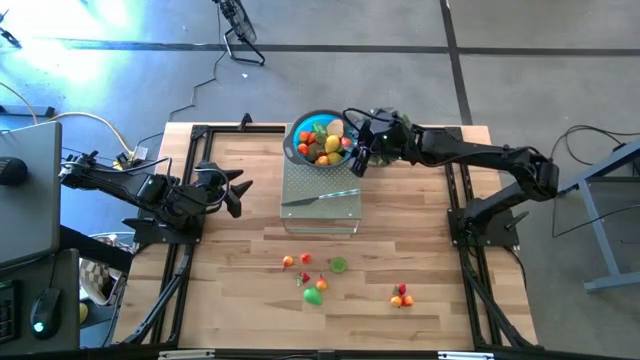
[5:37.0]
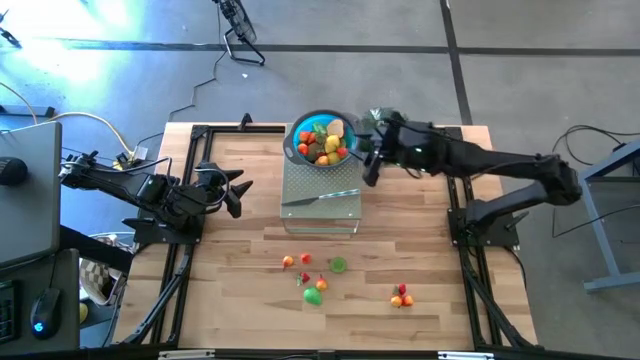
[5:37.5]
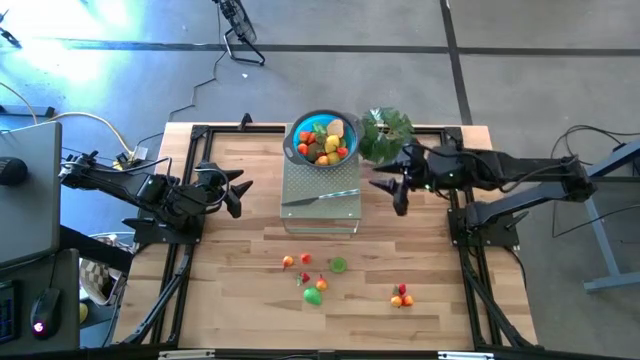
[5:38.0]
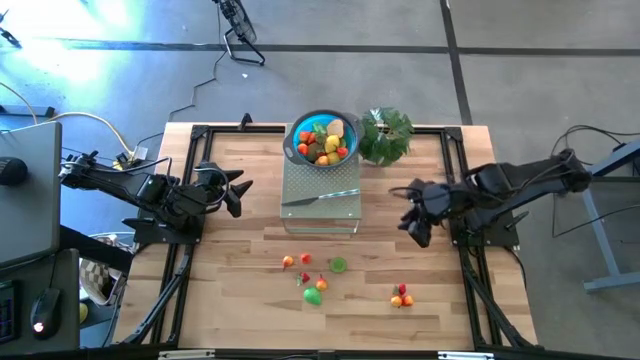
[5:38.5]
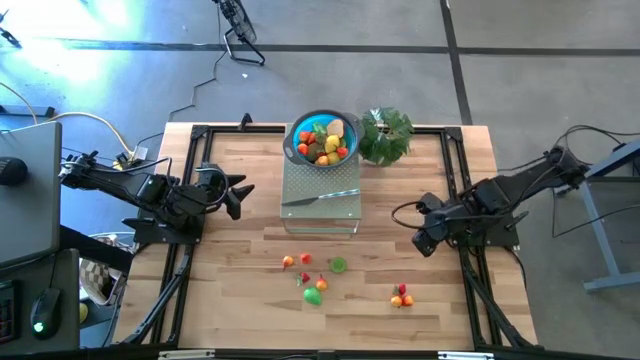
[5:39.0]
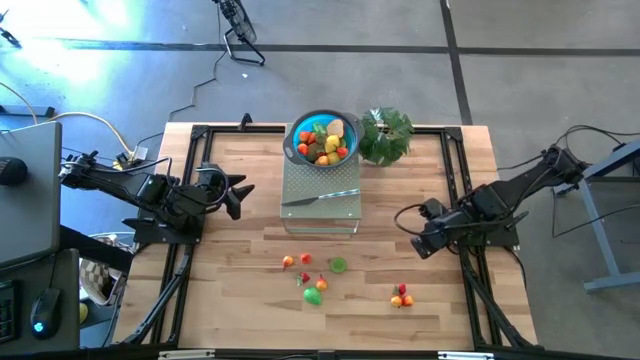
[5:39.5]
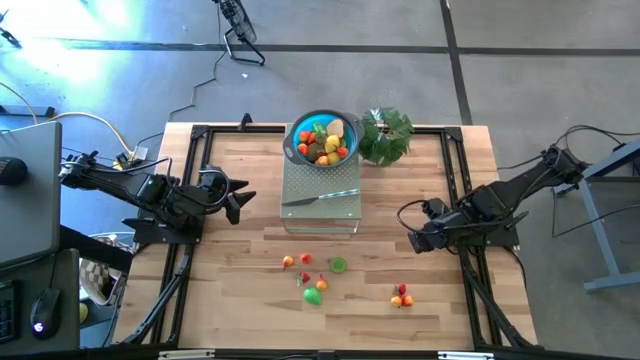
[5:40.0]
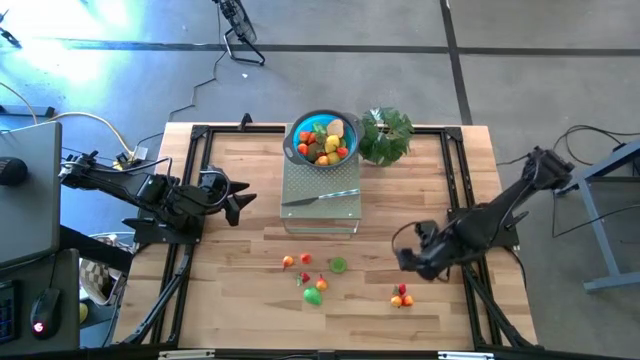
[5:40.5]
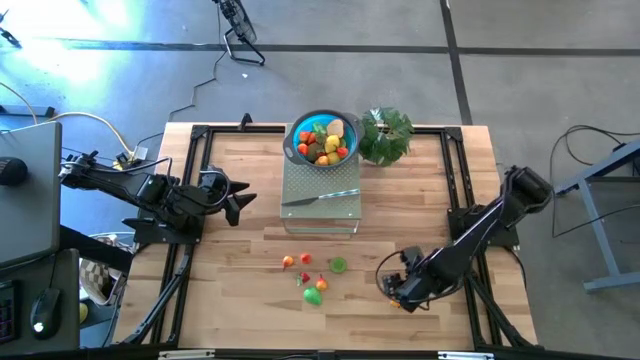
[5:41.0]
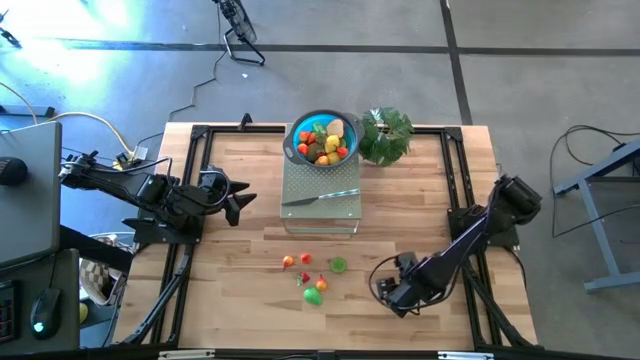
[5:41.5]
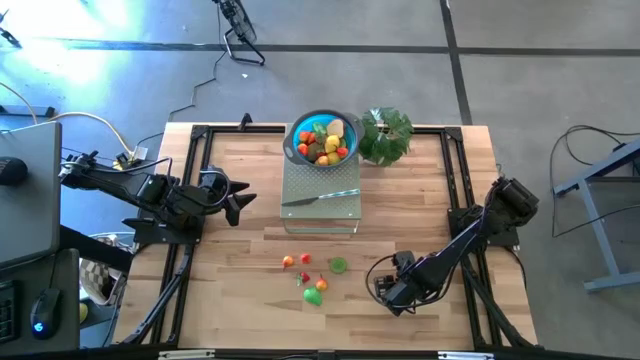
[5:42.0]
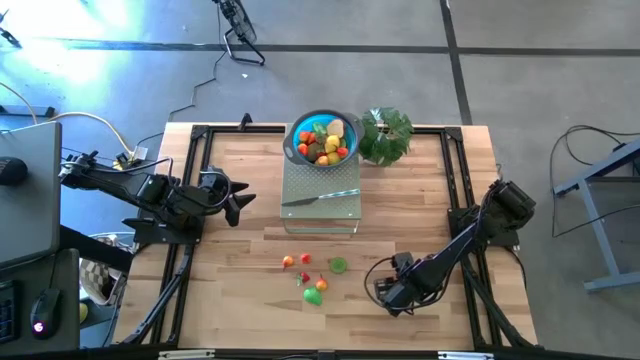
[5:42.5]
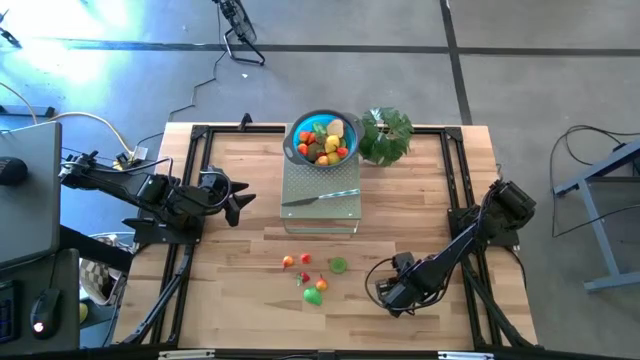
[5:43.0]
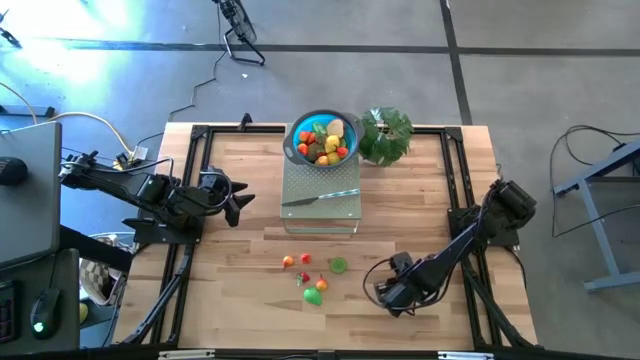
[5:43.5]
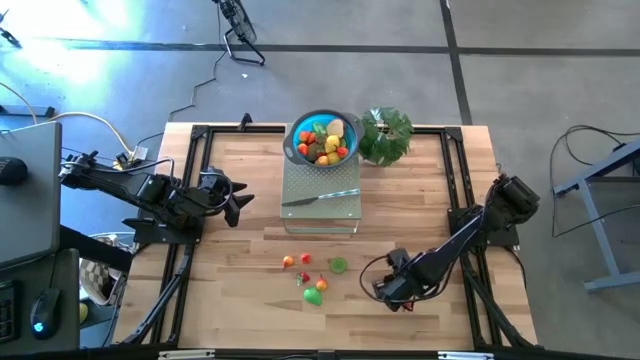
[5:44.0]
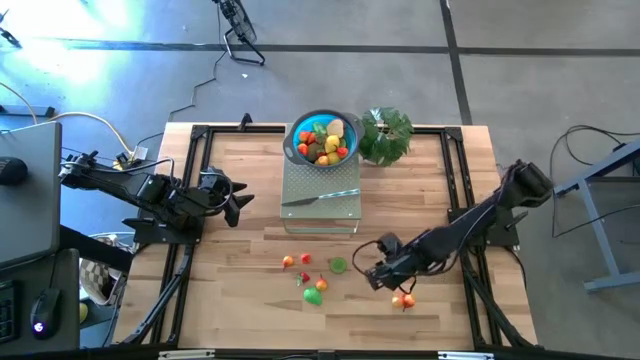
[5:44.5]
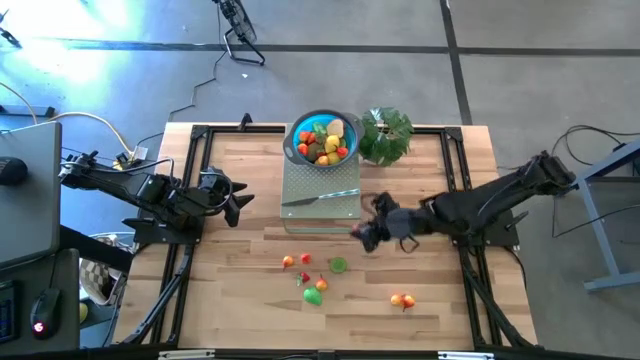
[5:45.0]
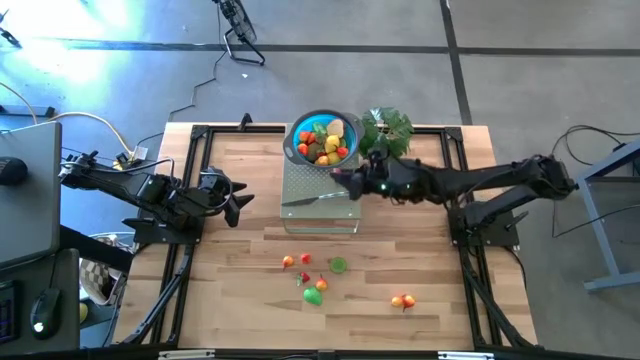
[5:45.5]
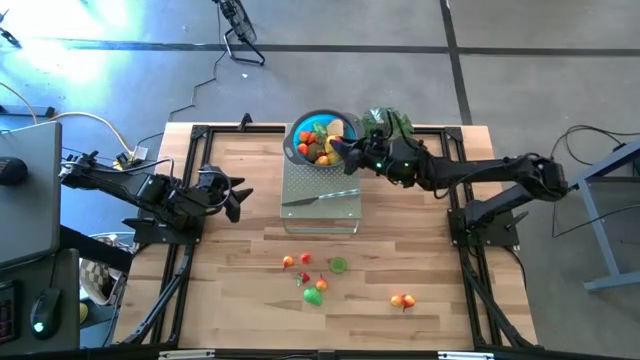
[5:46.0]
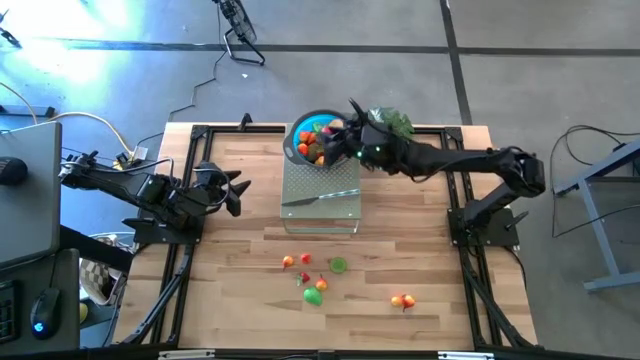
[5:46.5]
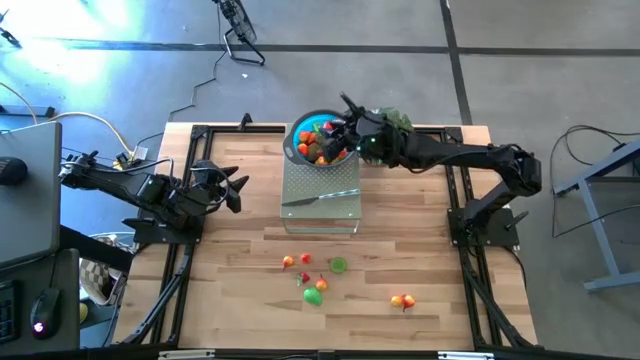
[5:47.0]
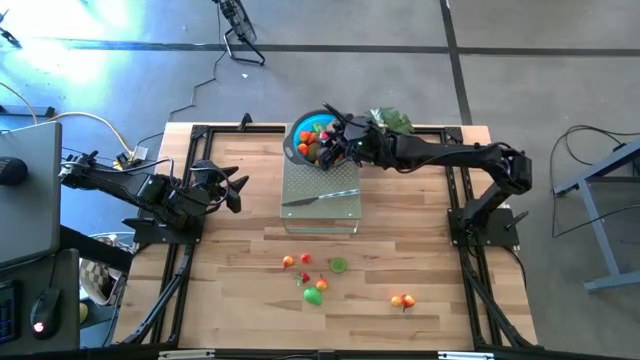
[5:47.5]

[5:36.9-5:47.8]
Task: Pick & Place Fruit
Put the red strawberry in the blue bowl on the shelf

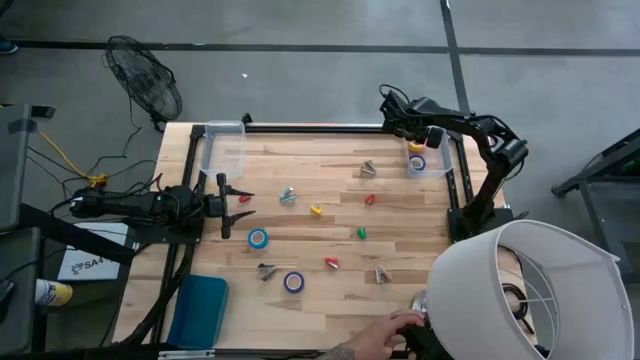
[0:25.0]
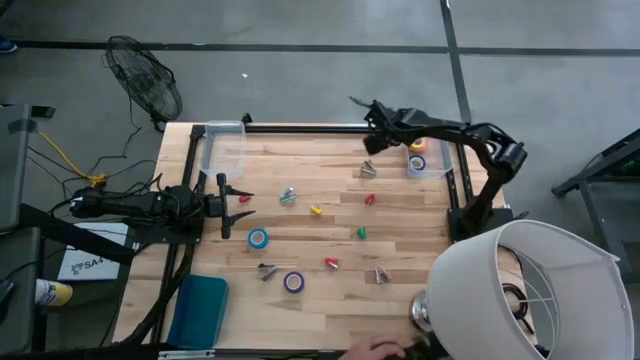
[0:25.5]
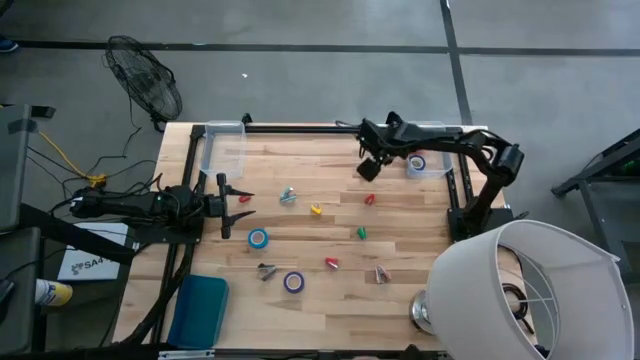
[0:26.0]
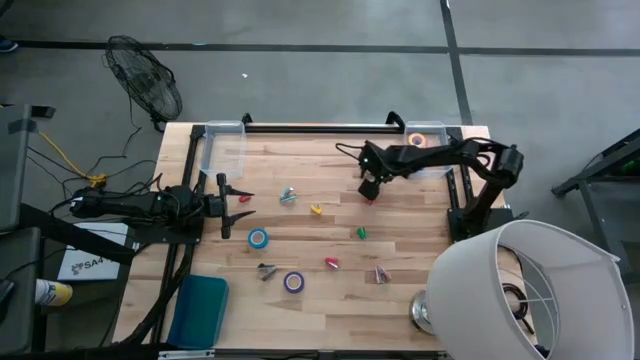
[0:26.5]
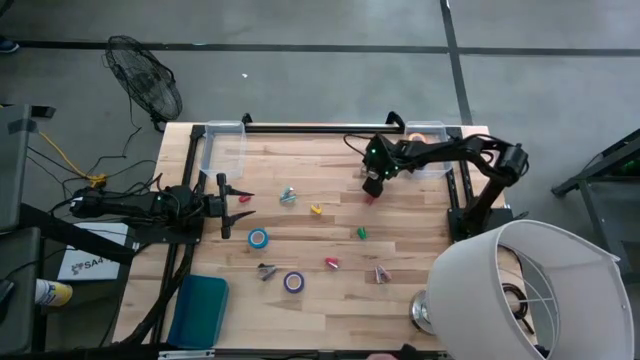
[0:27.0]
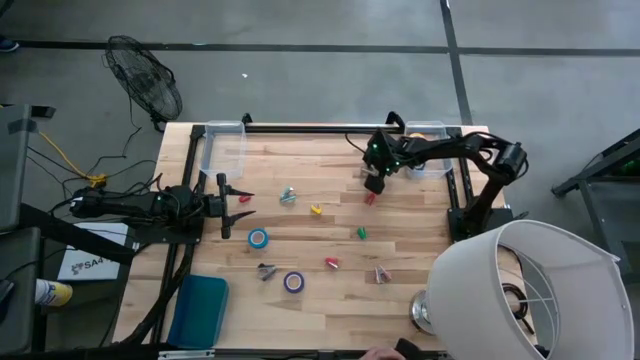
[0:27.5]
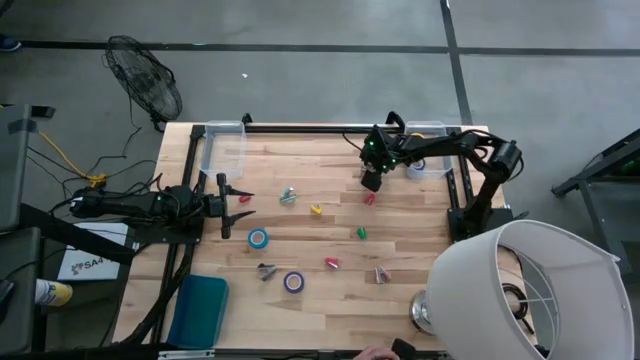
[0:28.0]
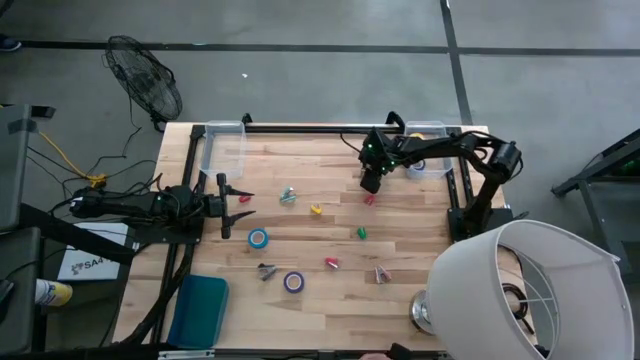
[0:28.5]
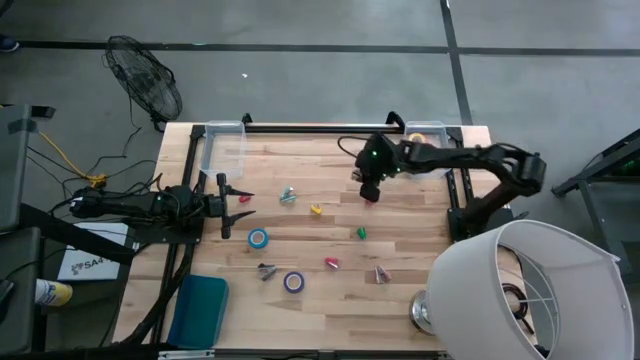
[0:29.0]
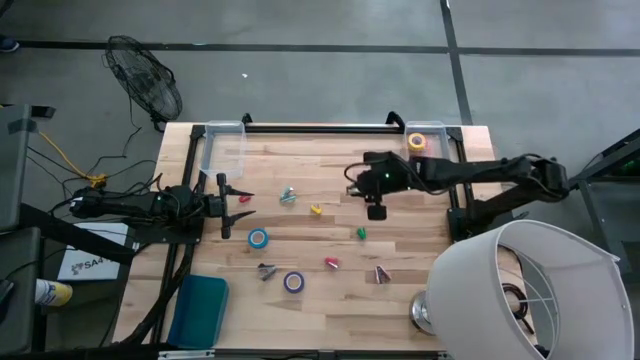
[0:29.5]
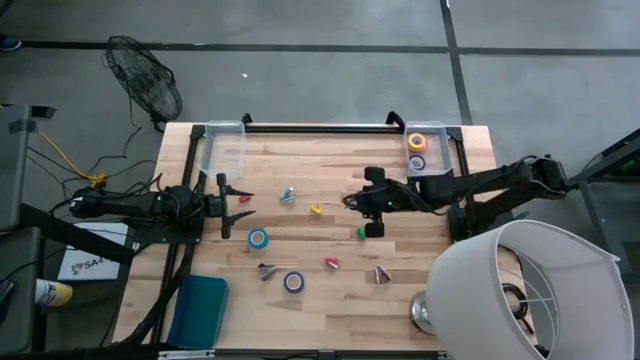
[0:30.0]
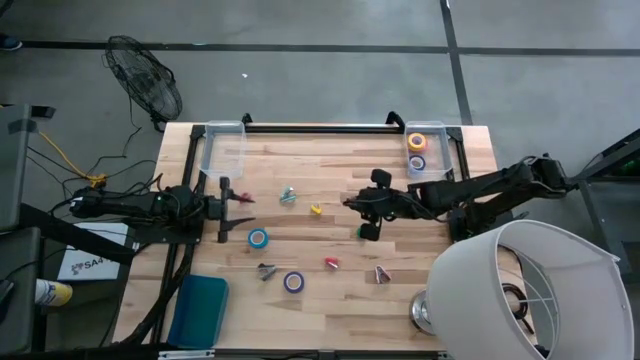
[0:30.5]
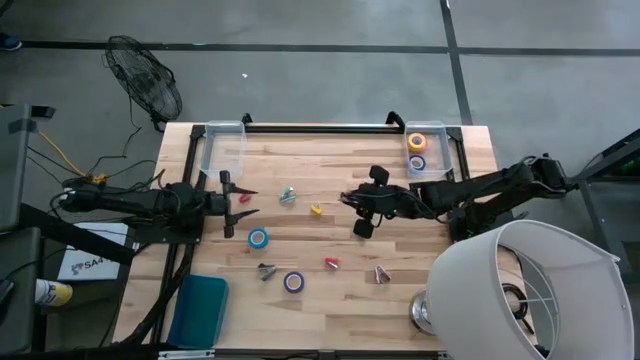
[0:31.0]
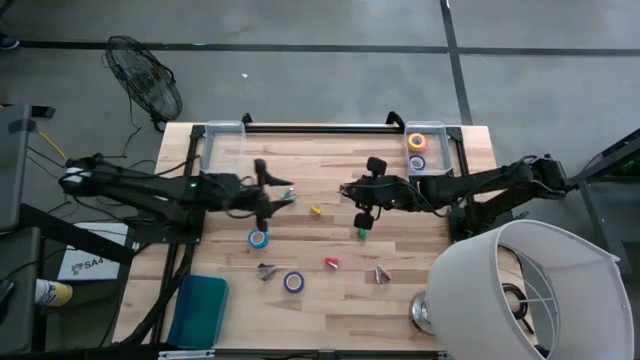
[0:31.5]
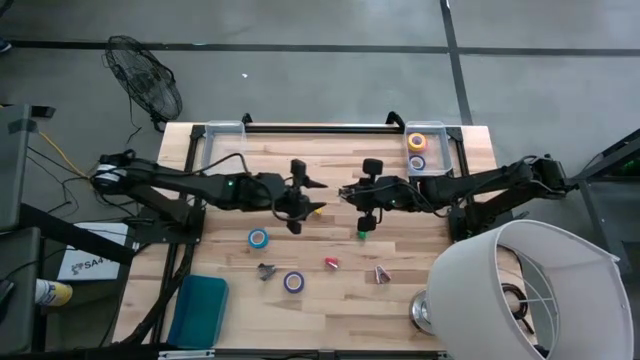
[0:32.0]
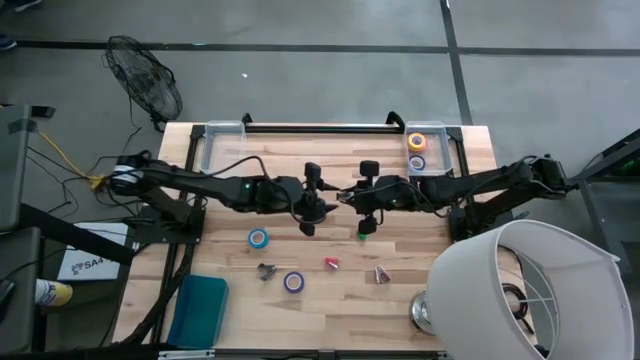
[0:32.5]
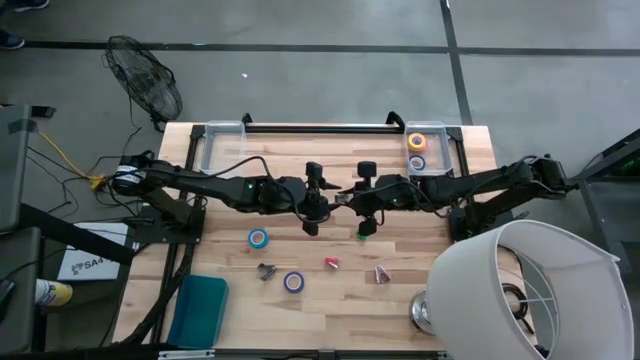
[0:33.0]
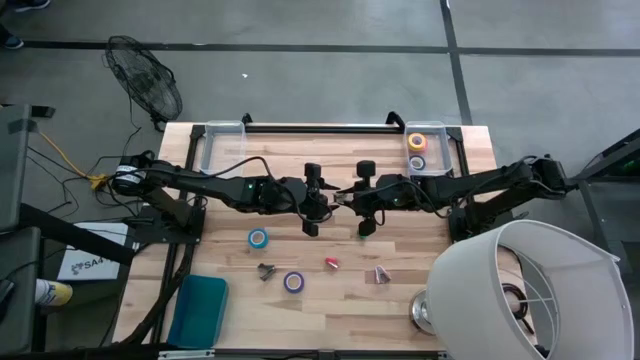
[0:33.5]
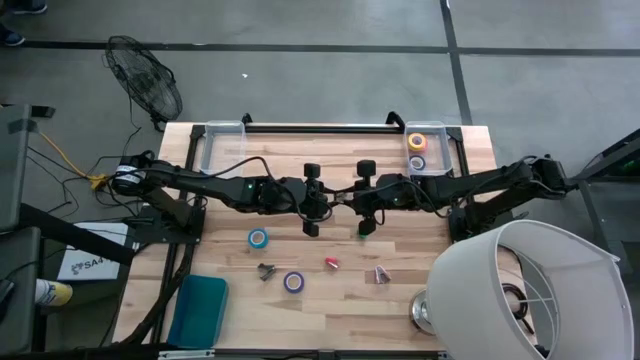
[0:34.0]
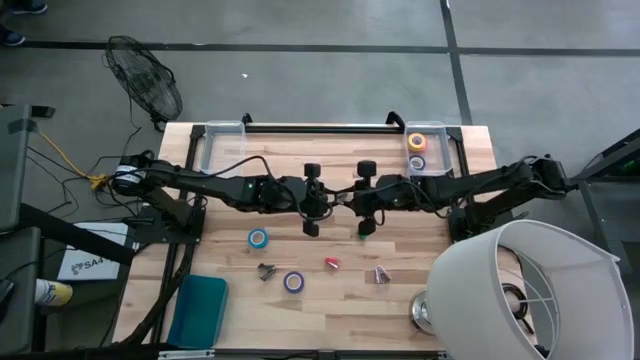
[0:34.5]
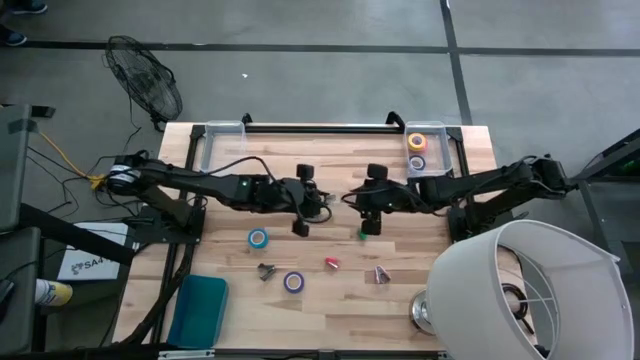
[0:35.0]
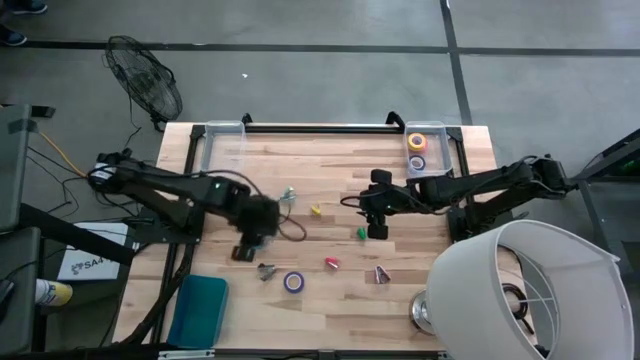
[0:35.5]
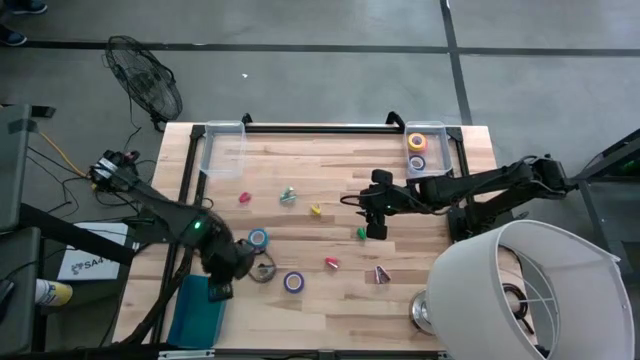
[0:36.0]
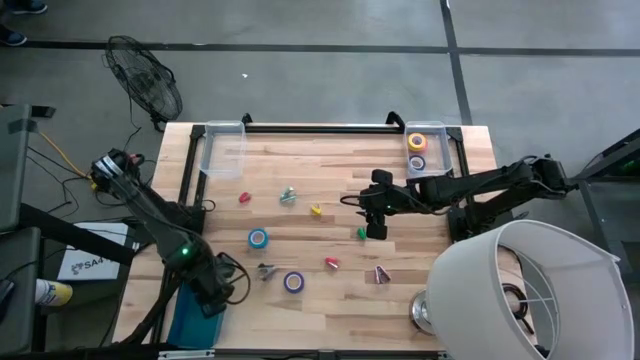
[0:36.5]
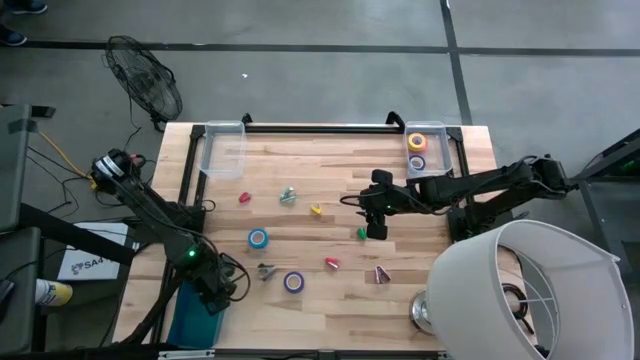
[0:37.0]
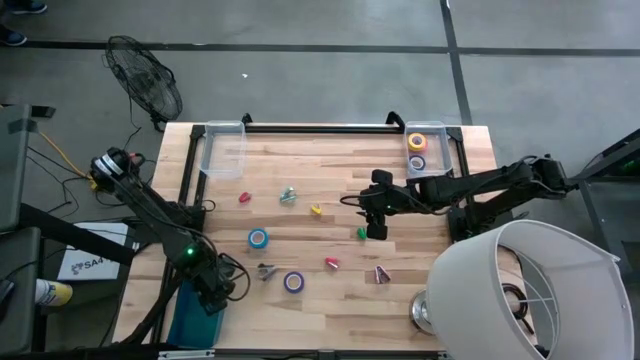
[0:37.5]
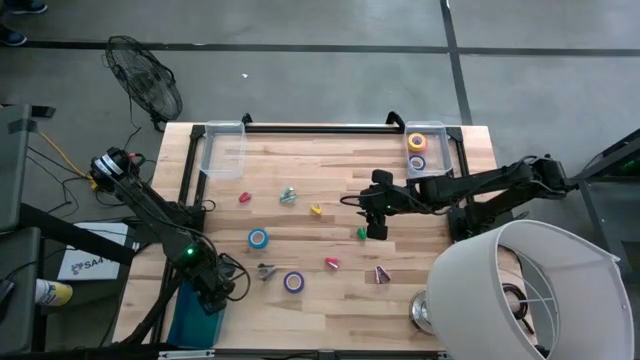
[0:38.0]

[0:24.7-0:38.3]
Task: Pick and place Stapler, Stapler remover, tape
Put the gray staple remover into the blue bin
